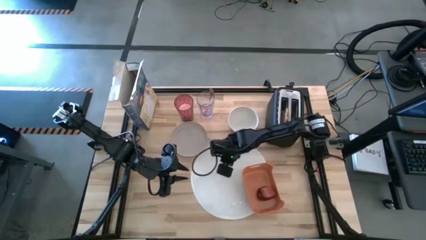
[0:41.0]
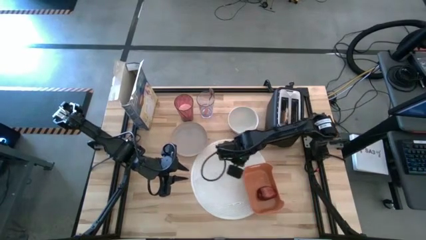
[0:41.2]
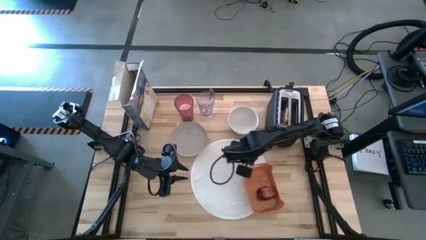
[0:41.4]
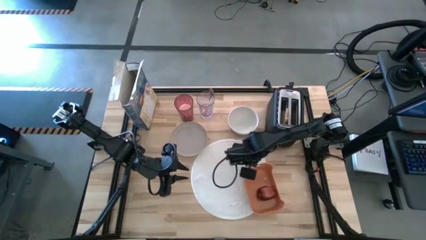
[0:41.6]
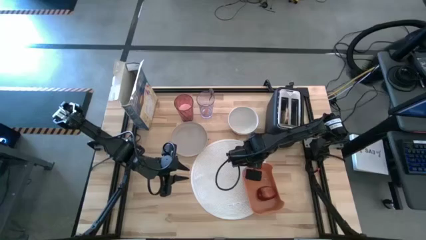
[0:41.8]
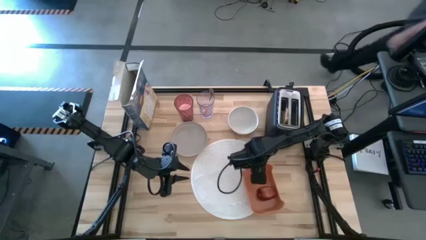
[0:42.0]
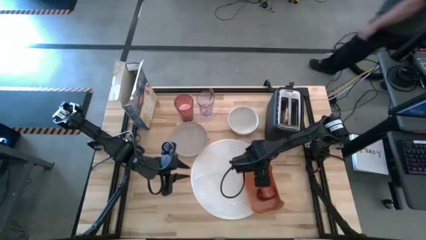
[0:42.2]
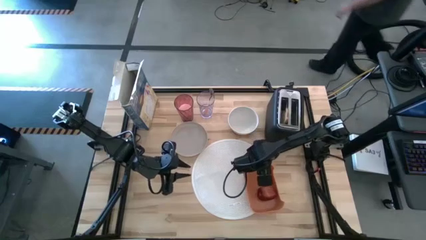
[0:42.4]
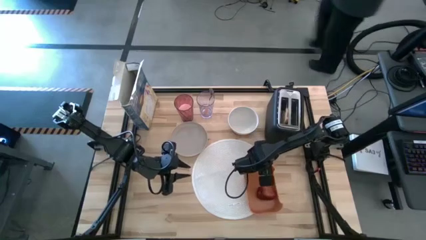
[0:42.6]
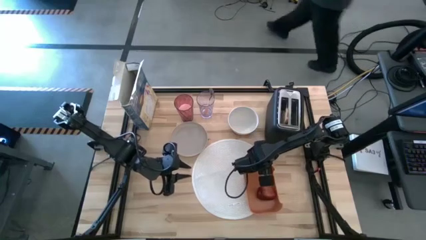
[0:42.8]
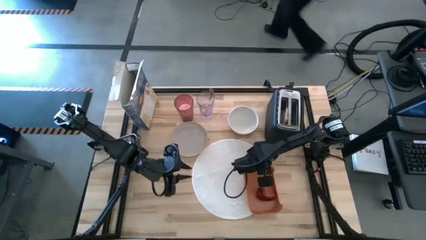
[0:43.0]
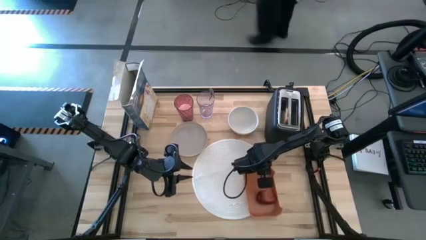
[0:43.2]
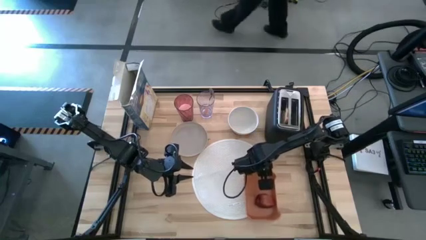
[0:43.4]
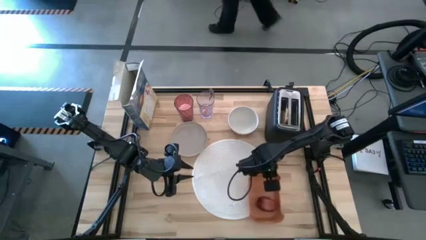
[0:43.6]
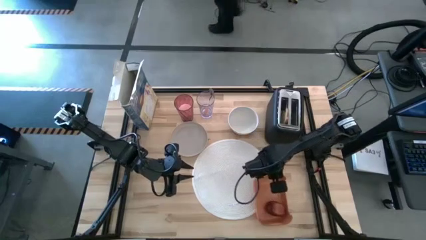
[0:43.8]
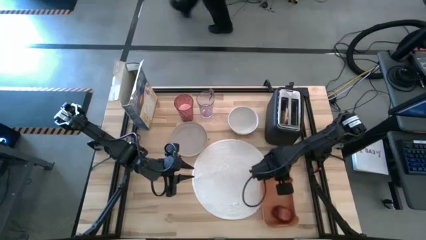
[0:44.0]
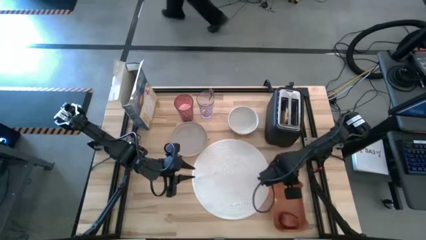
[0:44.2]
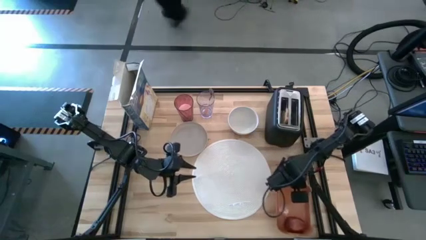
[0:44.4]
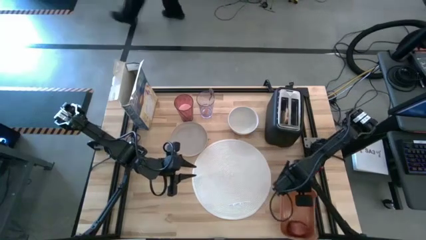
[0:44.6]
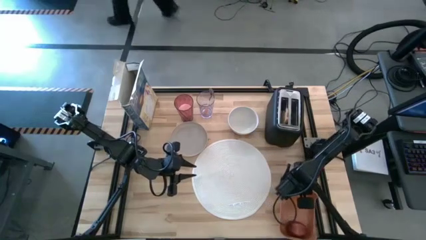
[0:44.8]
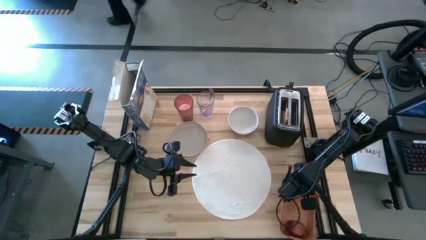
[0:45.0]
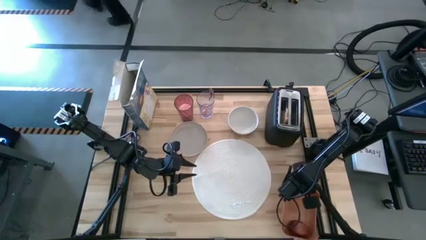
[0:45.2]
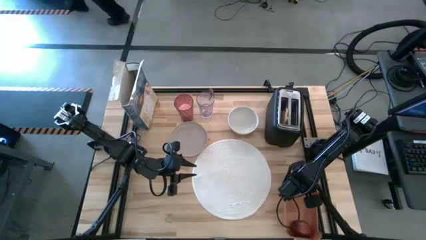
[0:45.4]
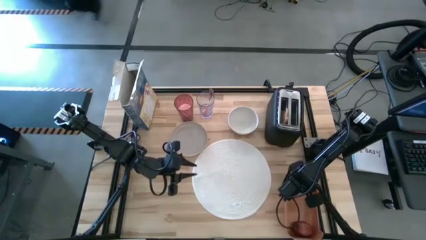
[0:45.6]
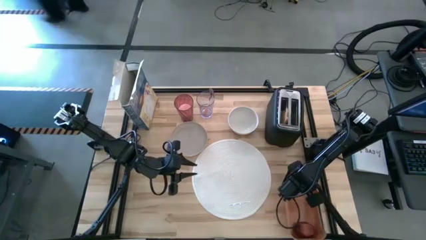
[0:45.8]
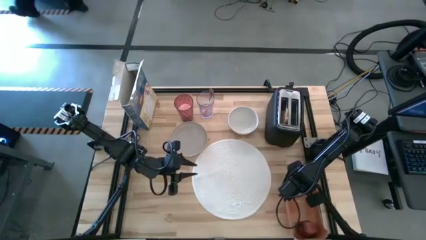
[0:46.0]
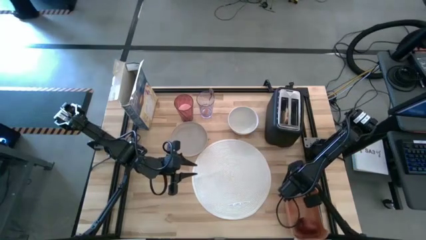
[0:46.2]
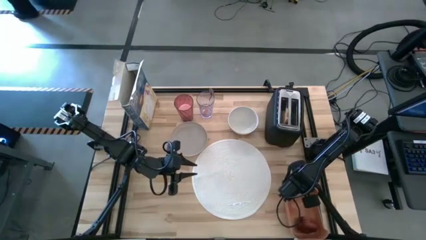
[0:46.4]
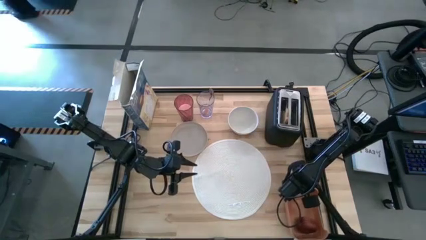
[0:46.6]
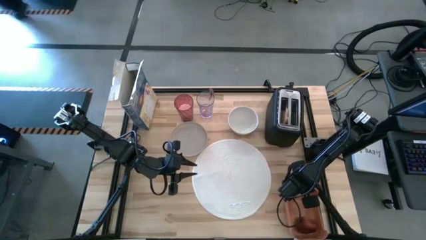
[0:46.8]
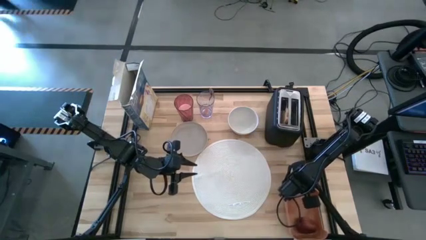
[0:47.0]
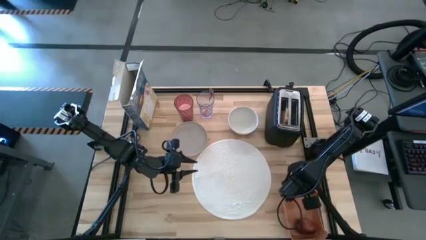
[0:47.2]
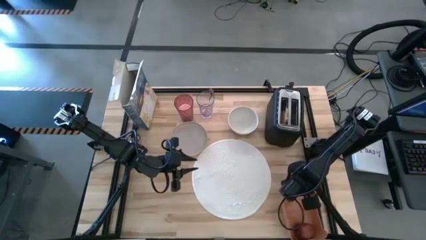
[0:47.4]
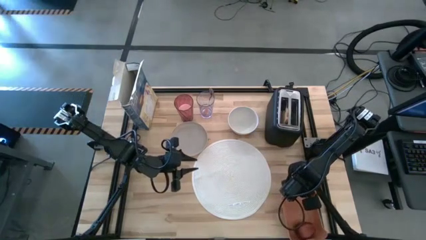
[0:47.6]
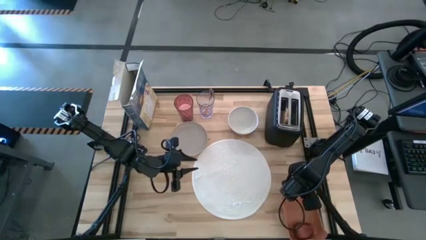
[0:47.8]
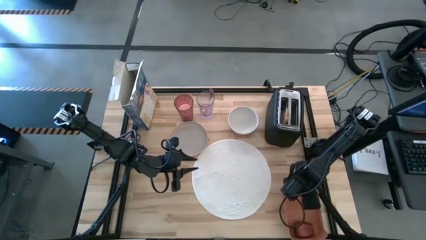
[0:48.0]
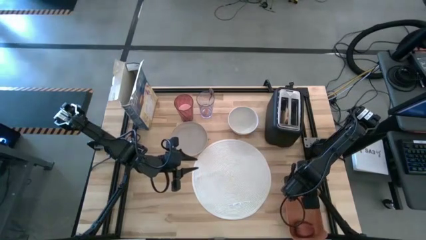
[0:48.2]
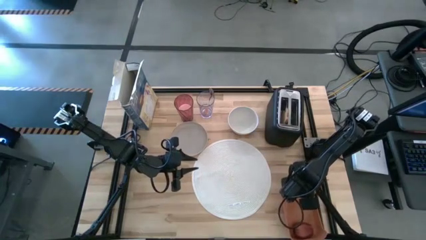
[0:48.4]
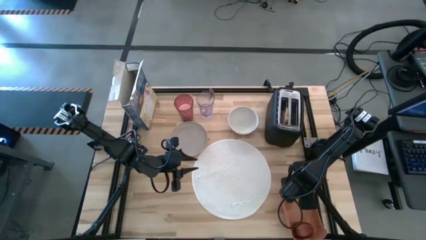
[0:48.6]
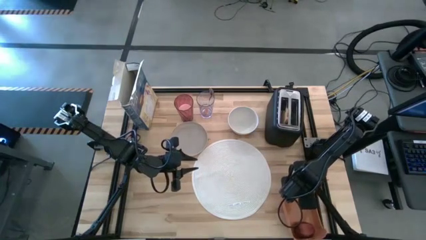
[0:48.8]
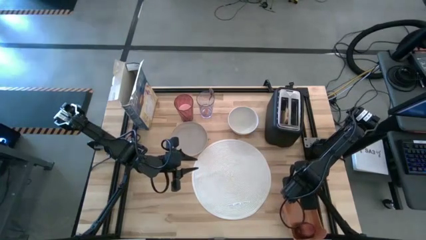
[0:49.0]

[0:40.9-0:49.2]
Task: Arrange a breakfast setting
Remove the orange bin from the white placemat

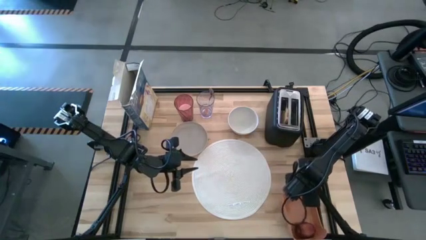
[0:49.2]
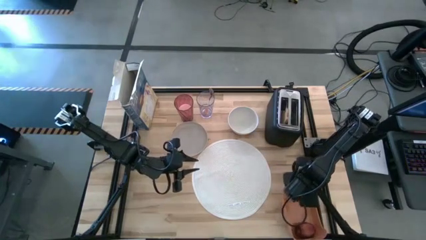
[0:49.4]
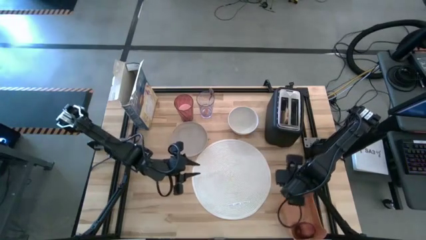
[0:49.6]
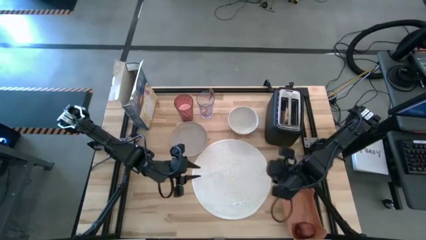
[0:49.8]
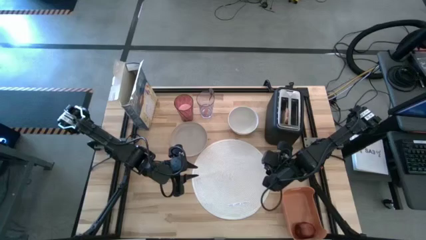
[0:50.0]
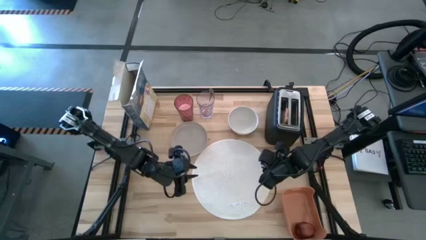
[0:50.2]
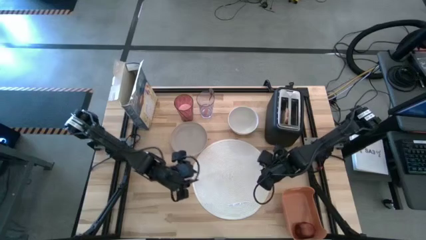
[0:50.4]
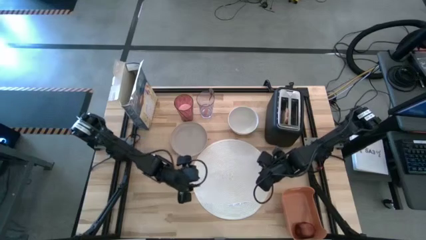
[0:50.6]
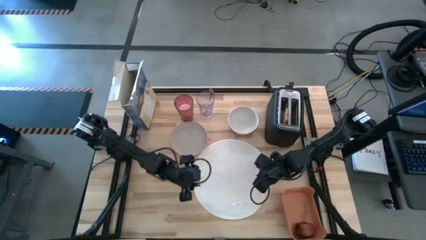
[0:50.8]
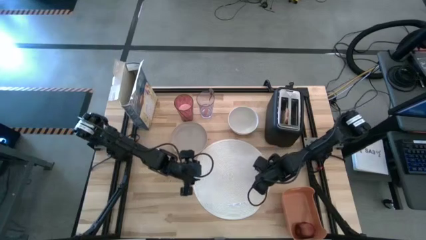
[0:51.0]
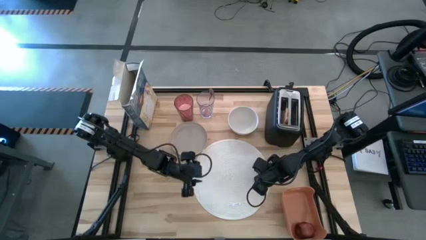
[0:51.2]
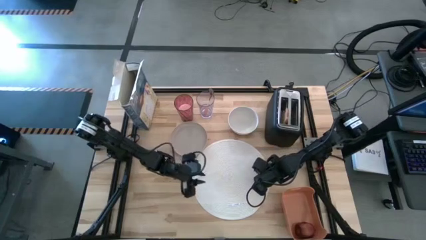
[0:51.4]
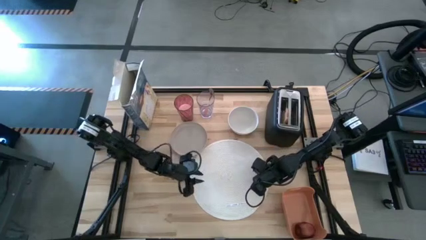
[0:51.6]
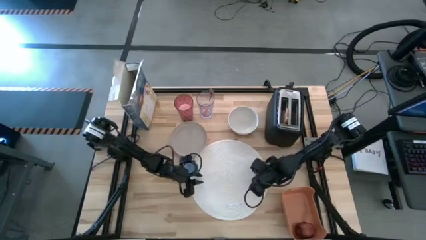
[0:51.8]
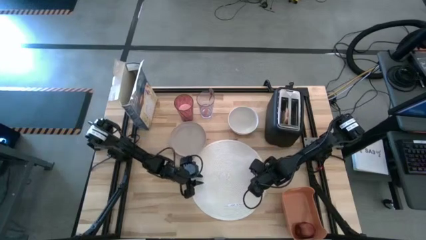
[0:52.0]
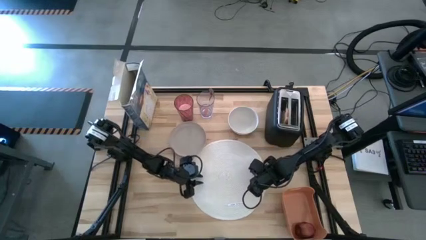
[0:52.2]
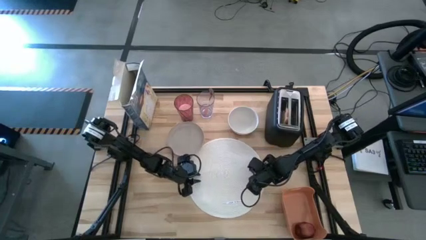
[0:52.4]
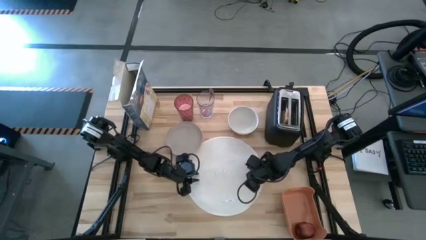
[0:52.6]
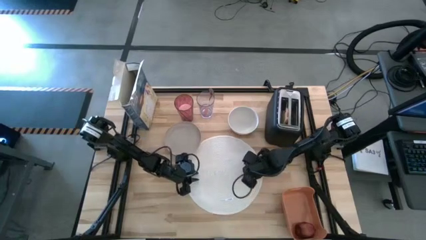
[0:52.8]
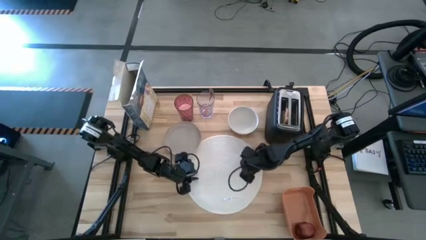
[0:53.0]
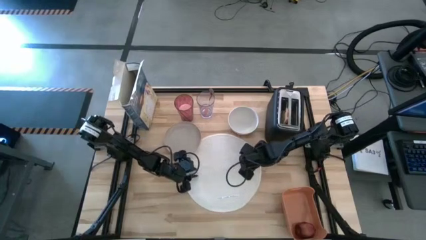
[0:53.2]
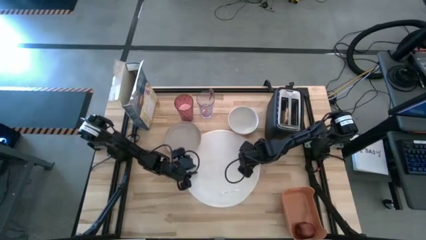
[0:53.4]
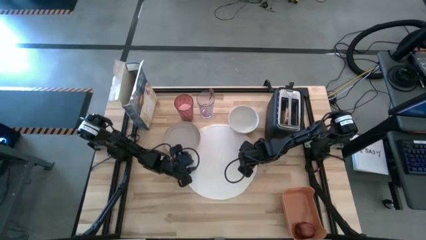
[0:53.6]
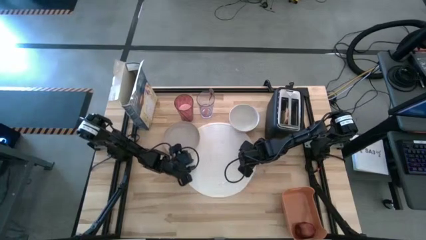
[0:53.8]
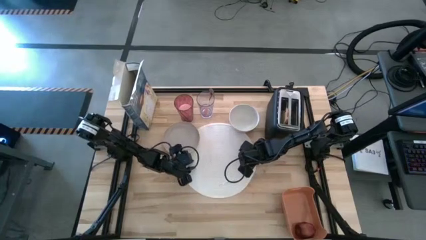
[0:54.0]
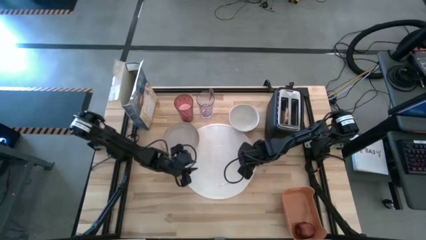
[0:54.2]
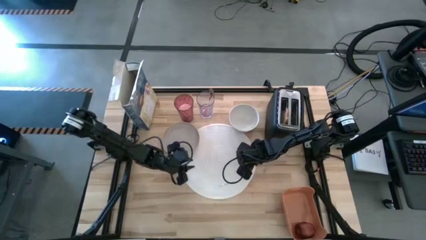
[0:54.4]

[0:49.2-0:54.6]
Adjust the white table mat

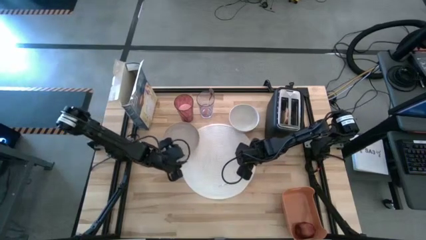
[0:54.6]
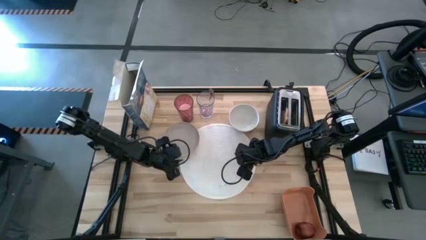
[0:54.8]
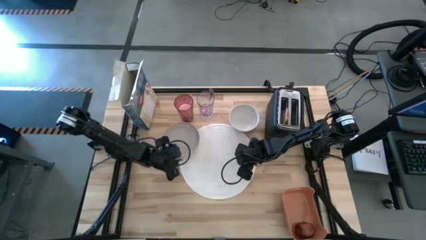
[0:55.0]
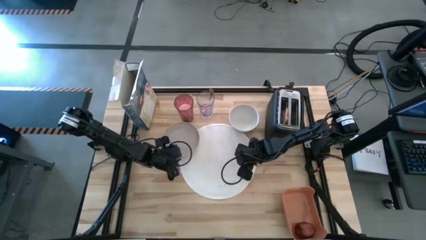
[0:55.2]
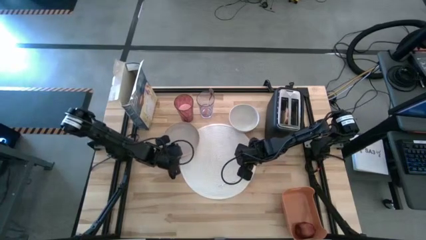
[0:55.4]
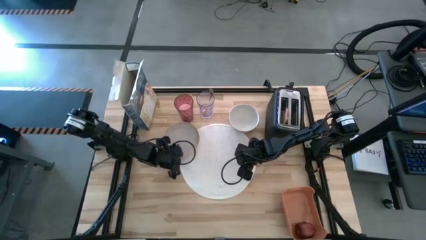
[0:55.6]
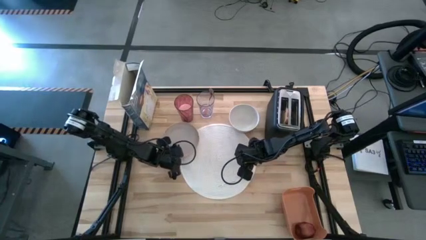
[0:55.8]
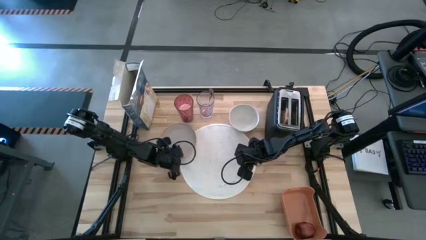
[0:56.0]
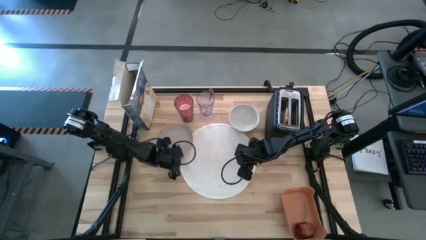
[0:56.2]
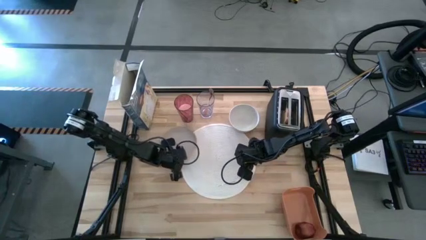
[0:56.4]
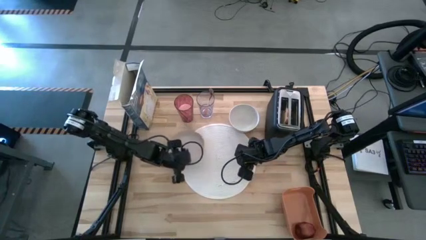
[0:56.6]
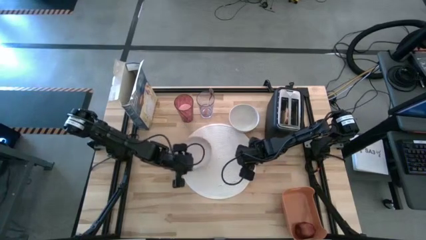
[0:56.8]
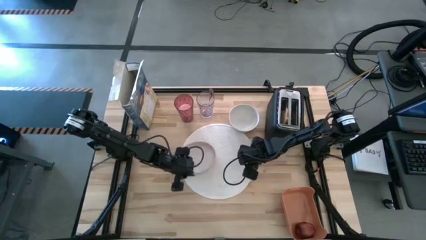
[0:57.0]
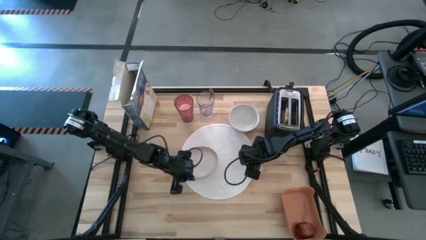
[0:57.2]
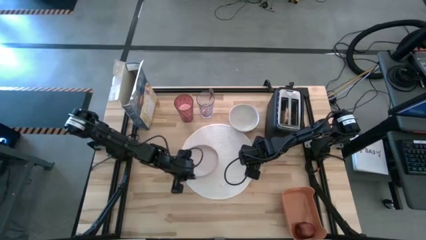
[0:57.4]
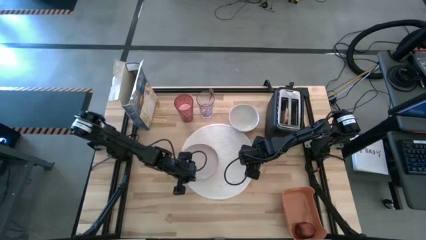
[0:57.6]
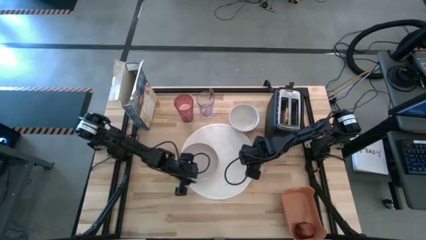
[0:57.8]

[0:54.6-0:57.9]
Put the peach plate on the white placemat
